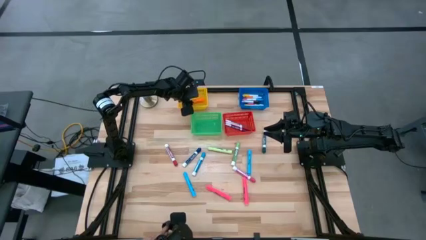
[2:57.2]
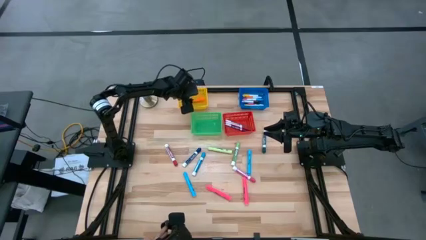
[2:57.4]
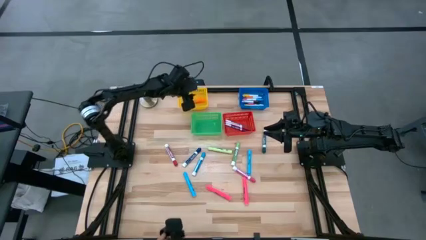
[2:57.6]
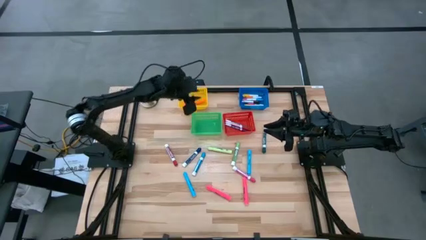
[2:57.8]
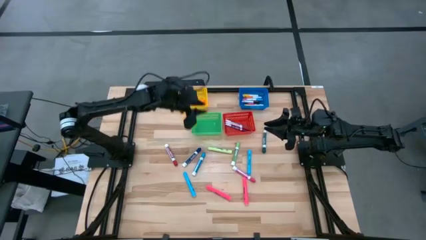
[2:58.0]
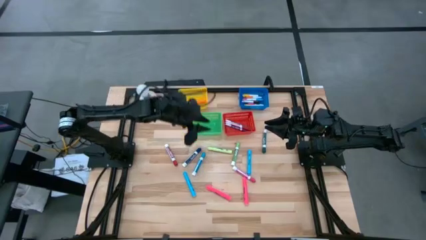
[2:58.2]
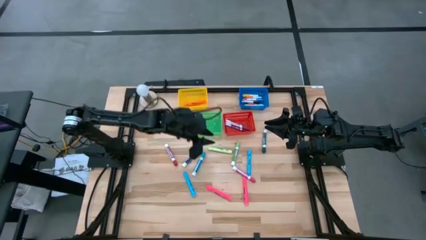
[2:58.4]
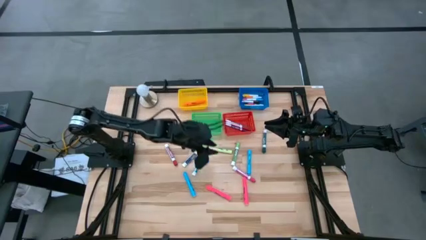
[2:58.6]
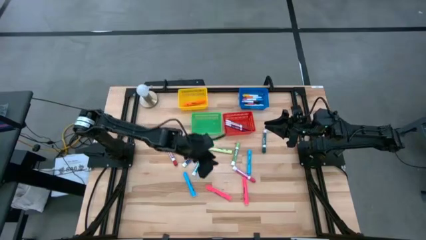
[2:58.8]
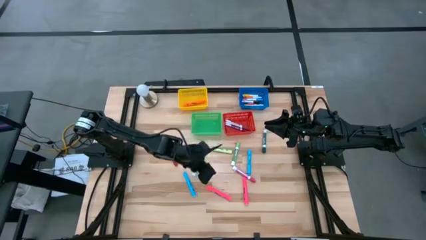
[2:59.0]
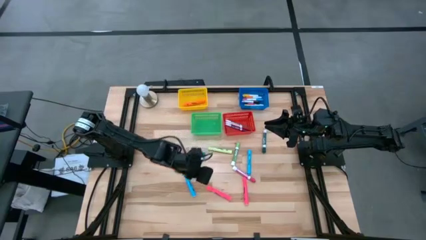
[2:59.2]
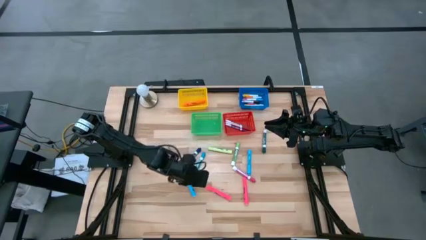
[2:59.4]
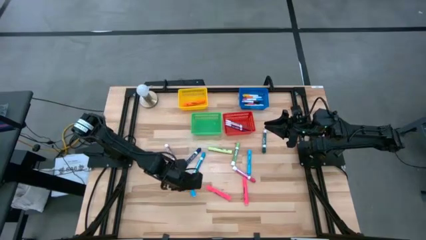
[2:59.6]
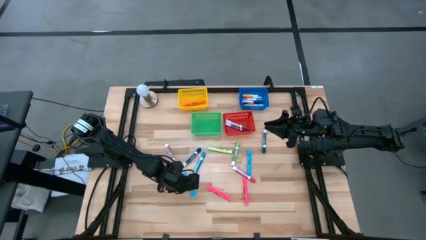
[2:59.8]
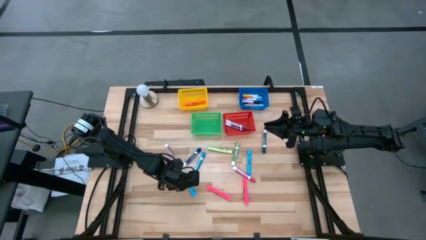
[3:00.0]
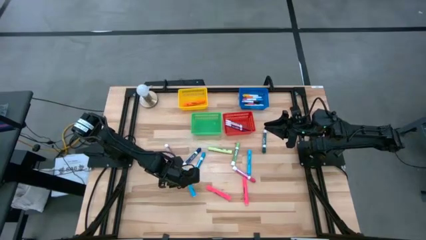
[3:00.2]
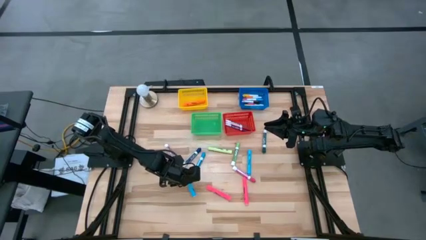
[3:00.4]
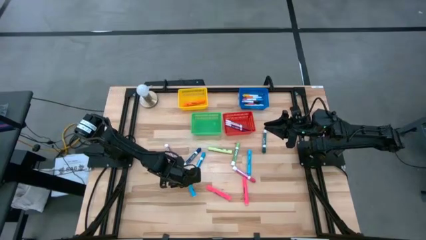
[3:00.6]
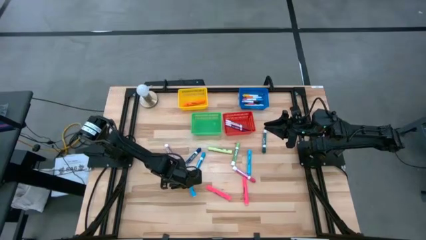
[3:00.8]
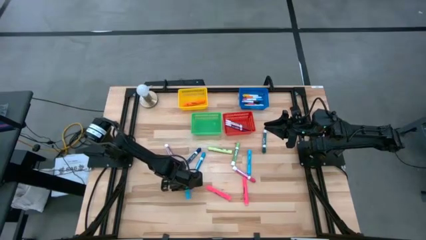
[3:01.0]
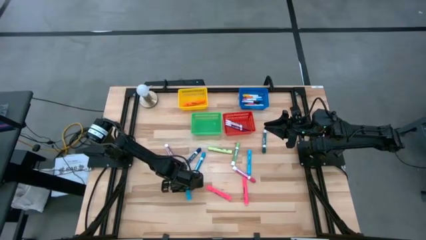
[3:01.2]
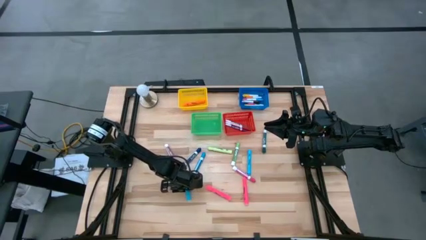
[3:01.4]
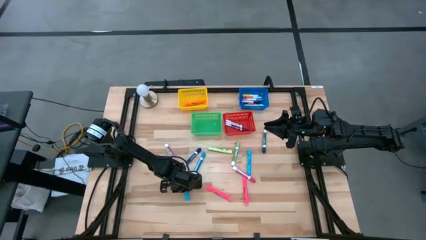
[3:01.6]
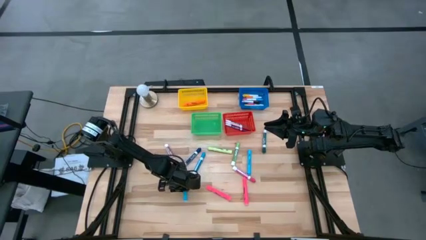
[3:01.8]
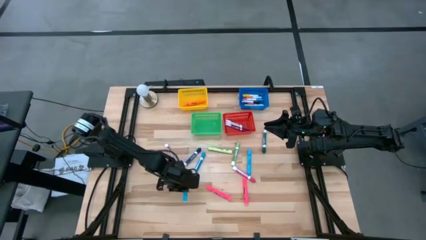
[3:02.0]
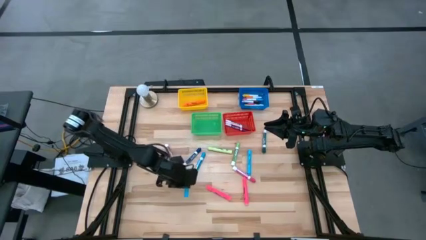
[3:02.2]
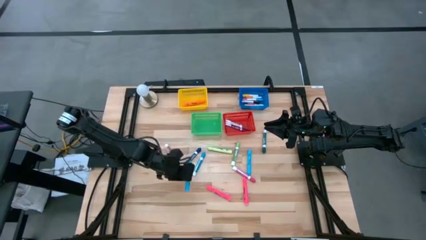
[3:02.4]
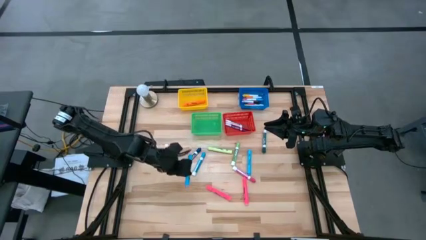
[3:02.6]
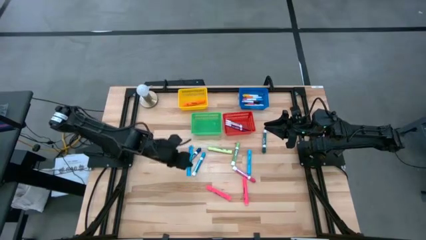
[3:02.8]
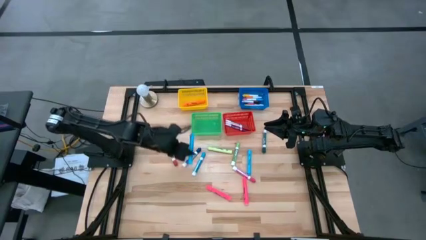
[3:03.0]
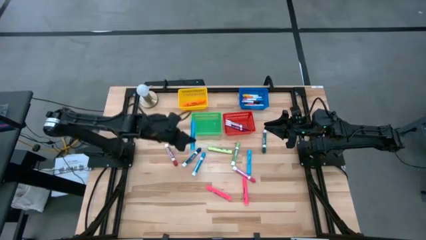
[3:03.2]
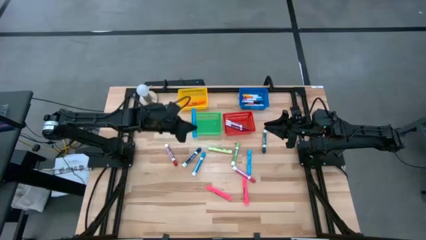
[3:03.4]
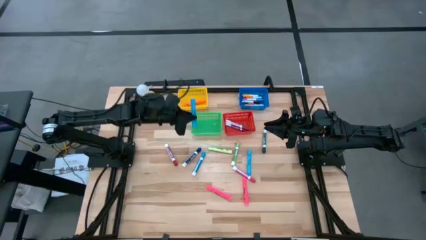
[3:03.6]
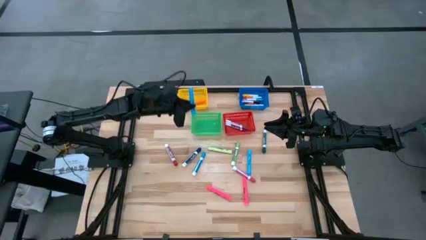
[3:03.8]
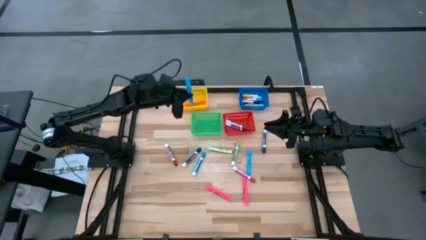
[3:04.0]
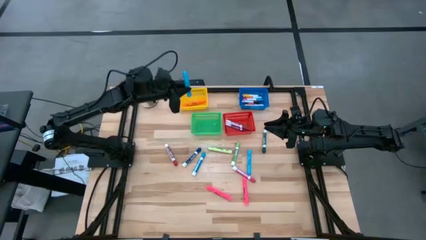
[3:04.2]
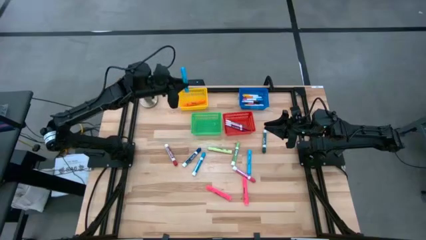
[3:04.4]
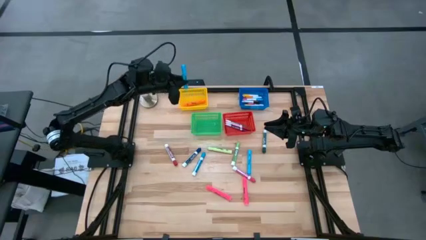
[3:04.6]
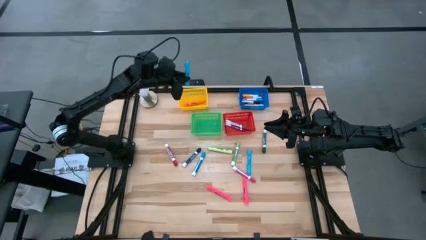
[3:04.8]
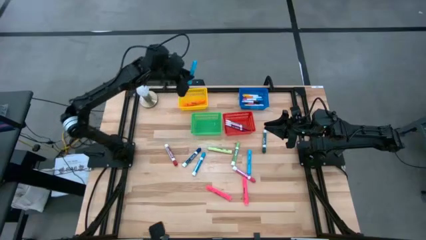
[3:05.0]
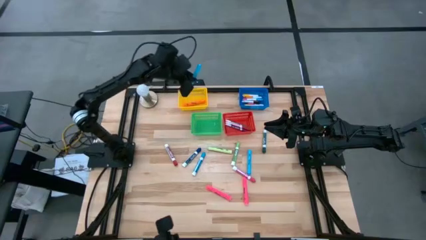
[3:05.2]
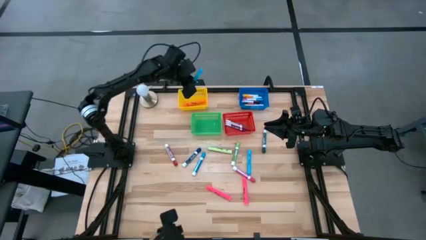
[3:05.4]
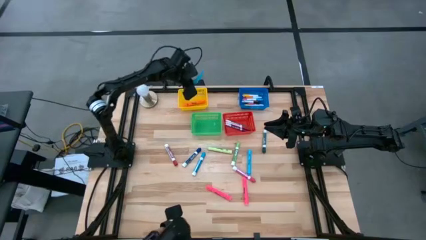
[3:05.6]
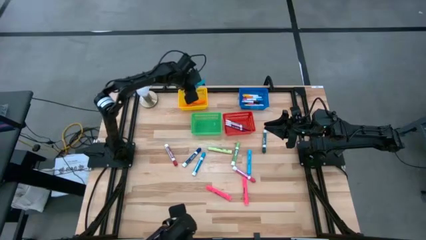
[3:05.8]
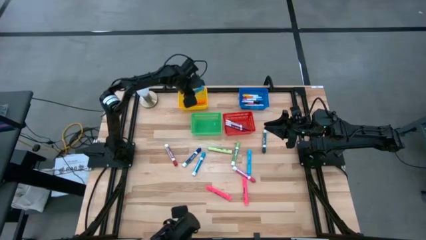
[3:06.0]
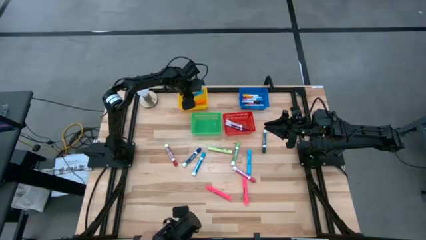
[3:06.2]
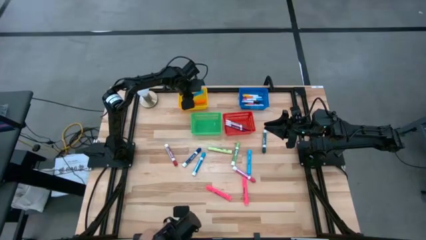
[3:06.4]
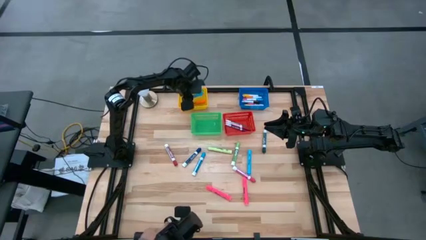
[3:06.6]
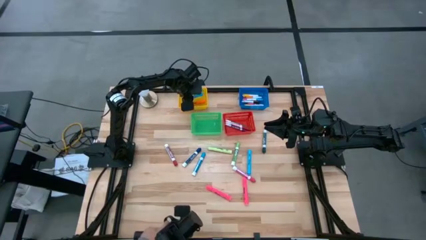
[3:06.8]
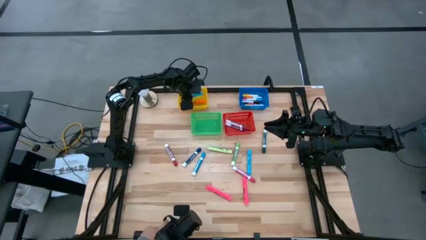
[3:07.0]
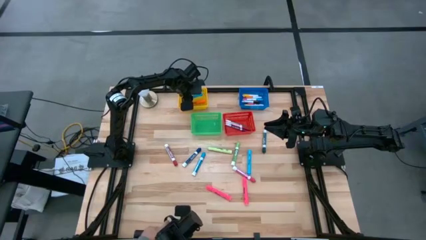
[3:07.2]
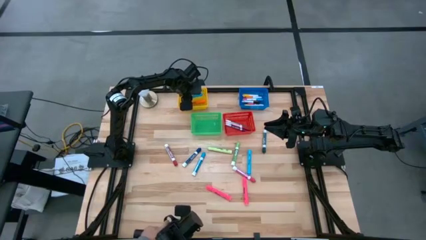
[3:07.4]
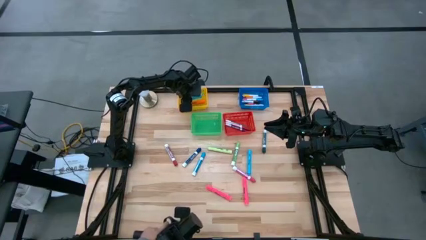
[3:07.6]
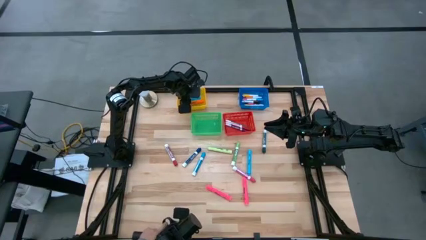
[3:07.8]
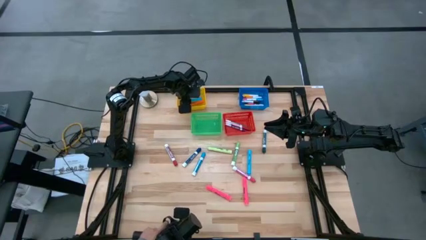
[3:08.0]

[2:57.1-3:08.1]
Task: Pick & Place Markers
Put the blue sharpie into the yellow bin

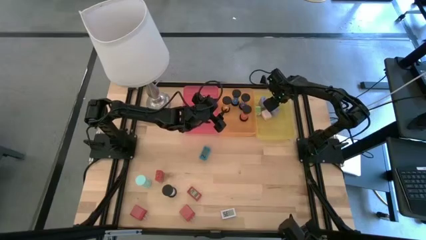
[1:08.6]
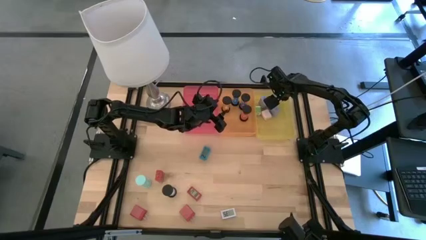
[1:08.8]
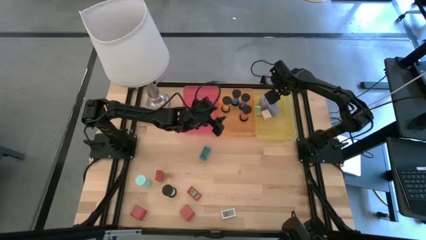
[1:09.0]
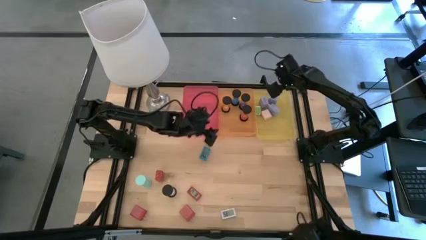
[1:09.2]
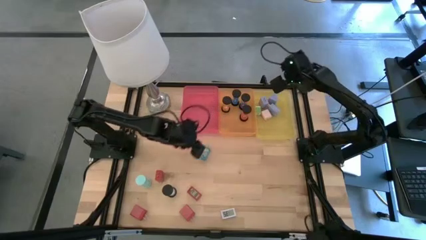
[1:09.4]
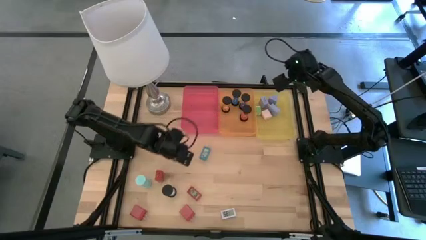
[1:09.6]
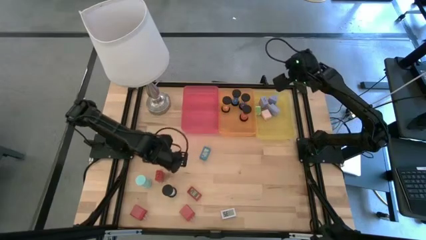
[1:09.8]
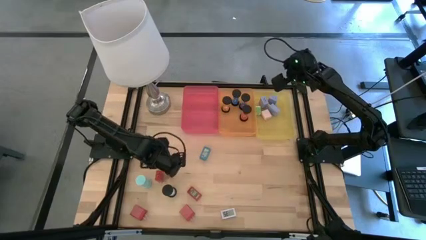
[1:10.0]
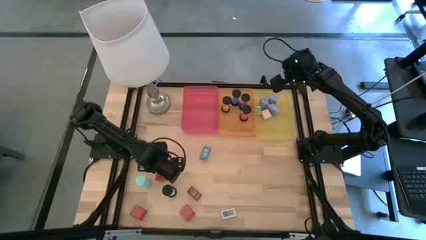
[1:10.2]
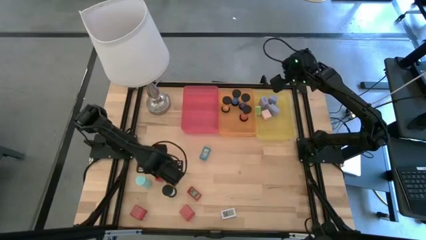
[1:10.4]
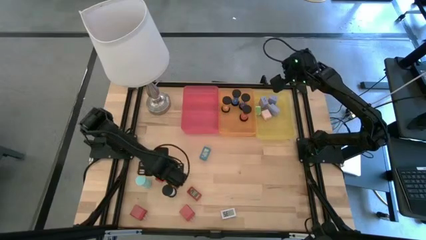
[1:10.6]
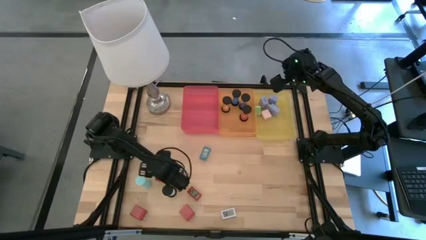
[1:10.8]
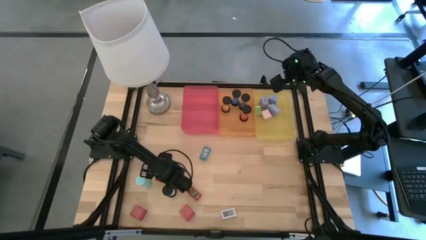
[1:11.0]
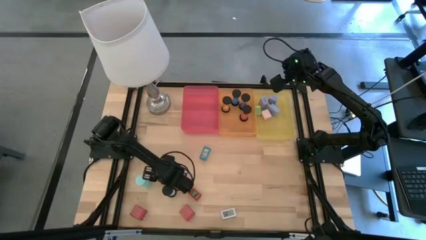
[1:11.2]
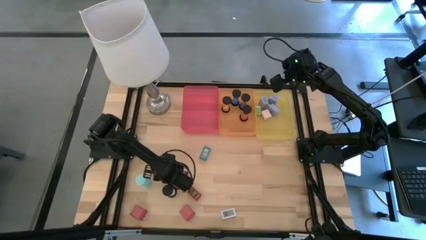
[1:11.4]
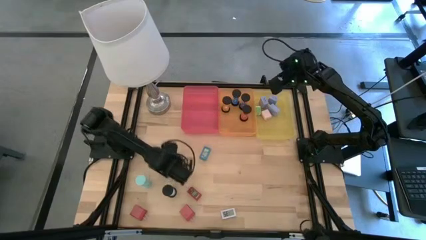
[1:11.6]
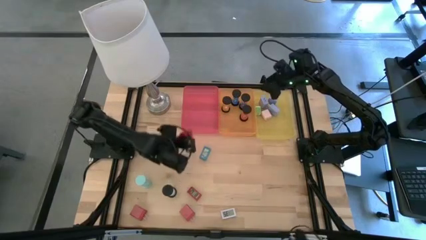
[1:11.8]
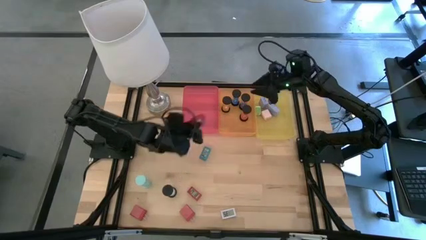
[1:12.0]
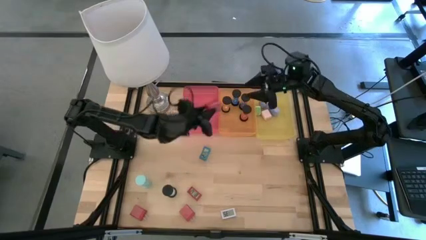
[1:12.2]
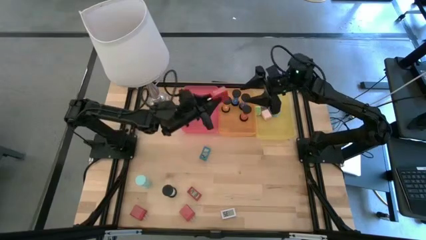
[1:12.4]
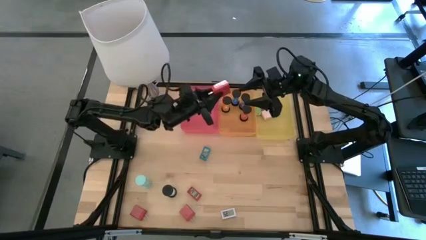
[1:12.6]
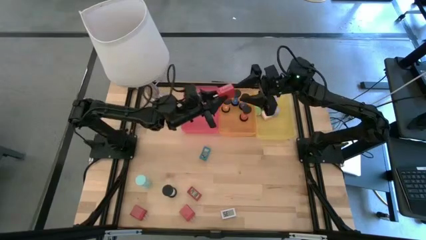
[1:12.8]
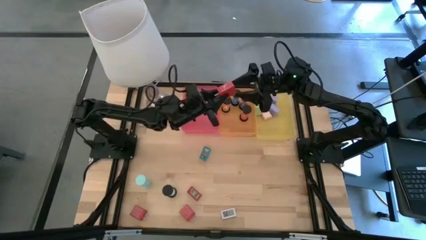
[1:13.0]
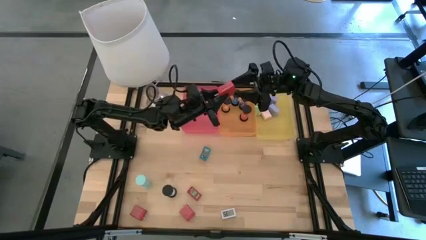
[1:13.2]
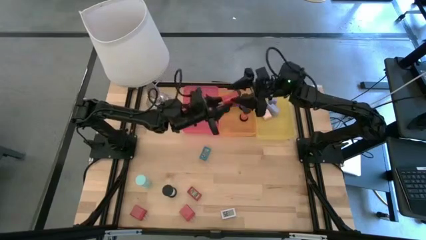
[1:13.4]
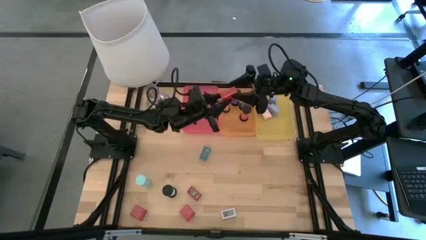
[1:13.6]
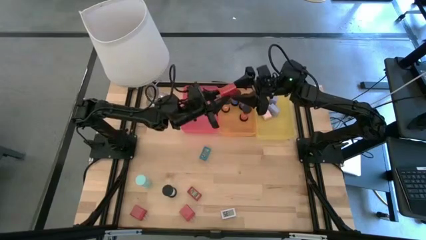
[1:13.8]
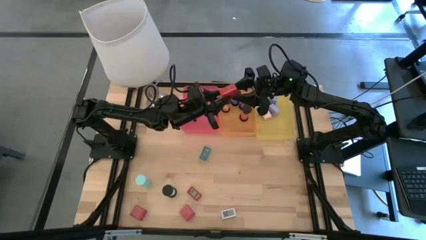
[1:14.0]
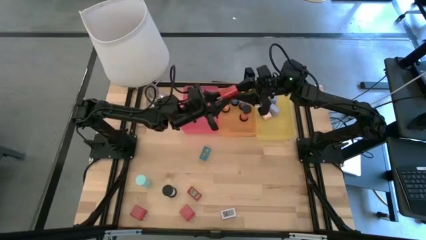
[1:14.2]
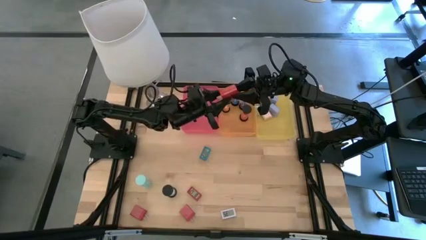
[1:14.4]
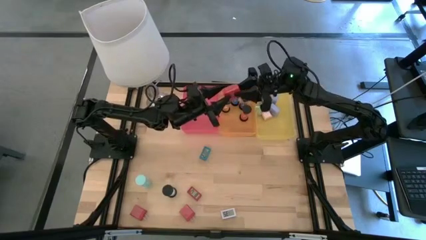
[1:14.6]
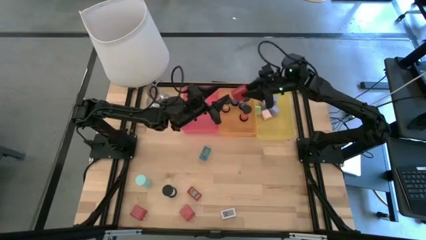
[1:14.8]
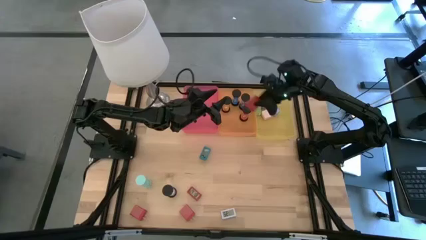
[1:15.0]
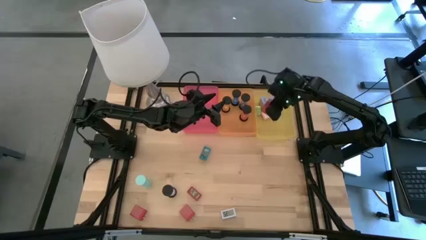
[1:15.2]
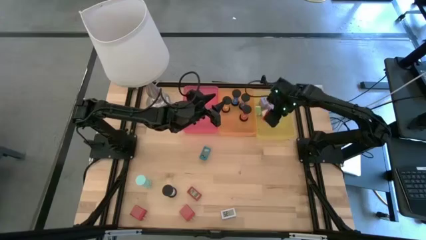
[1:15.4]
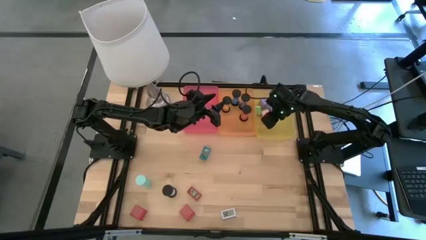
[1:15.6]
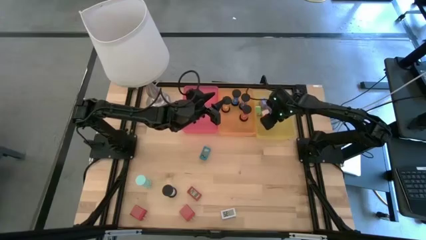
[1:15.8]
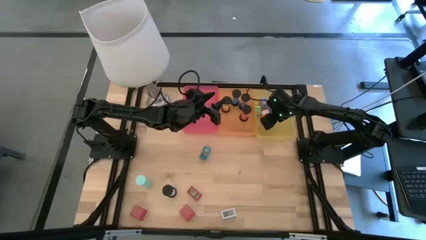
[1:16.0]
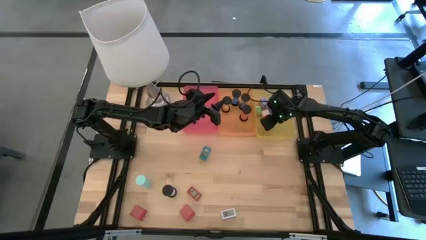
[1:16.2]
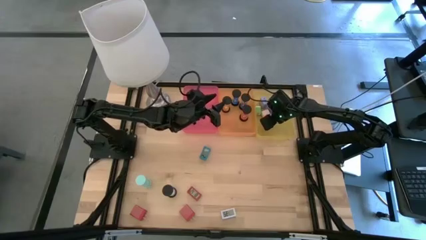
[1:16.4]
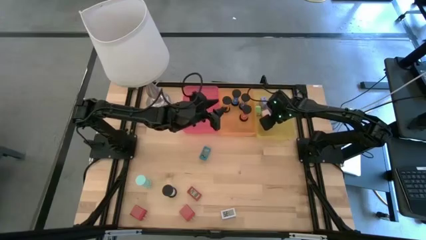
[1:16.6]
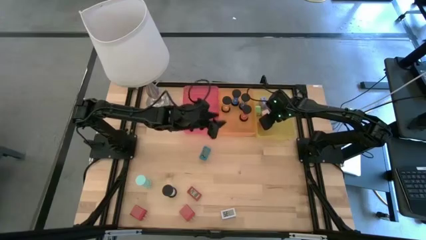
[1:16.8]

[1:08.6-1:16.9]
Task: Pick & Place Office items
Put the top red charger adapter into the yellow bin
